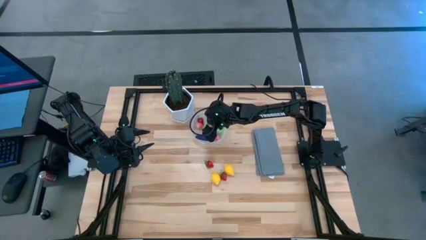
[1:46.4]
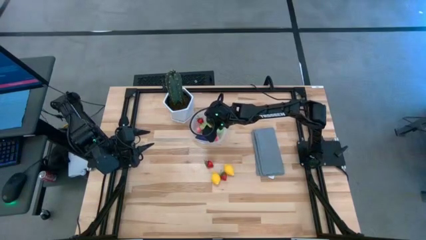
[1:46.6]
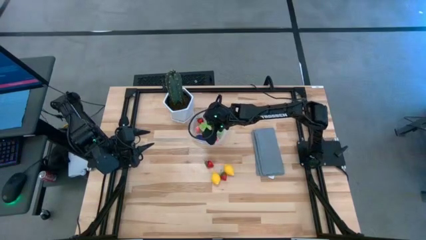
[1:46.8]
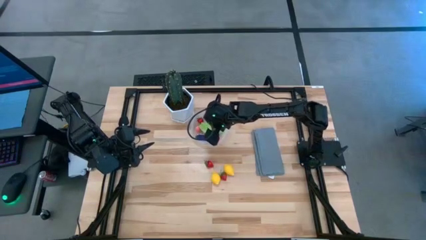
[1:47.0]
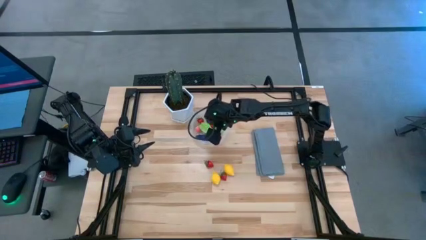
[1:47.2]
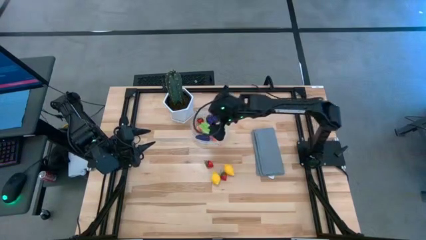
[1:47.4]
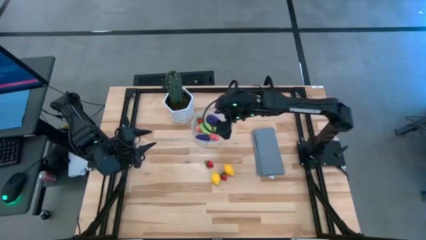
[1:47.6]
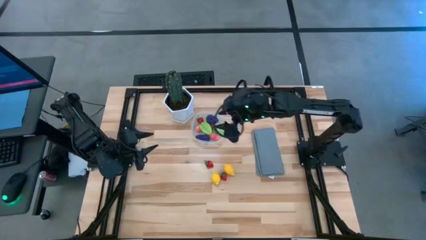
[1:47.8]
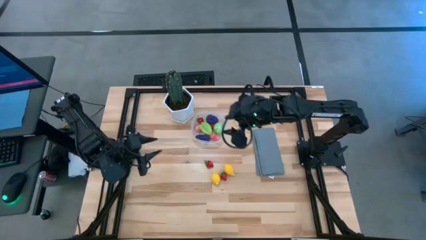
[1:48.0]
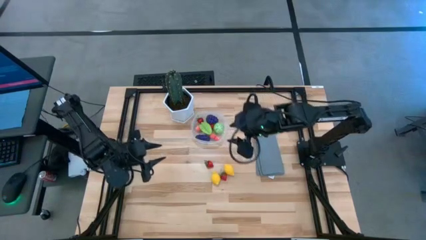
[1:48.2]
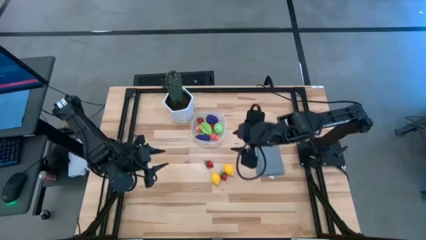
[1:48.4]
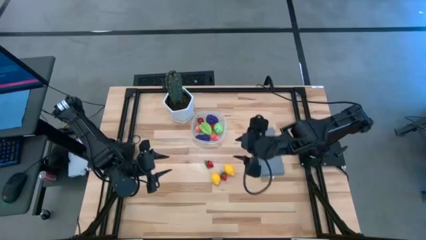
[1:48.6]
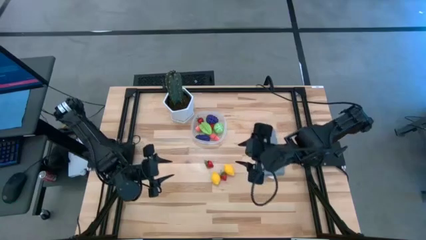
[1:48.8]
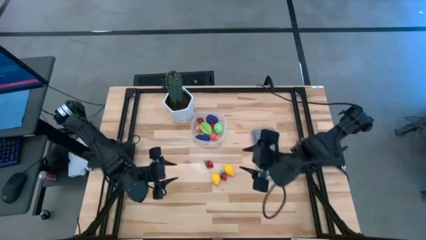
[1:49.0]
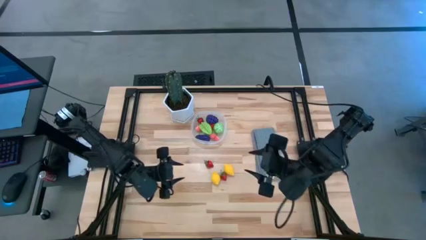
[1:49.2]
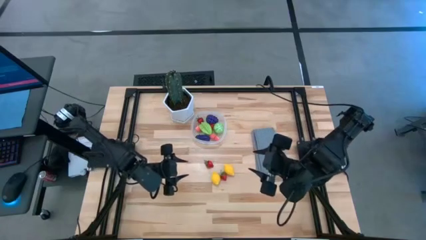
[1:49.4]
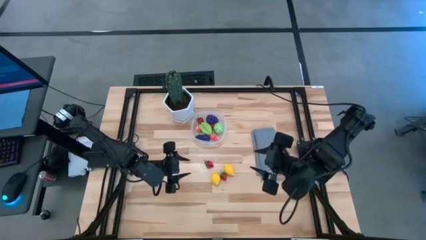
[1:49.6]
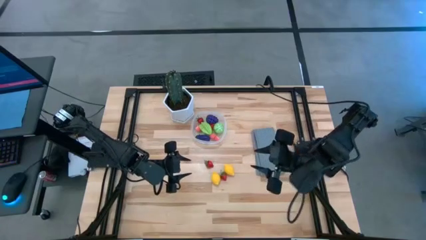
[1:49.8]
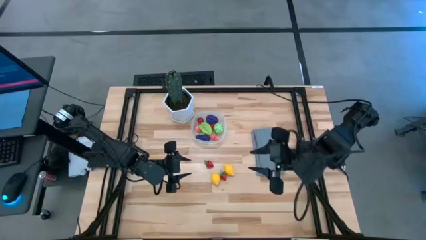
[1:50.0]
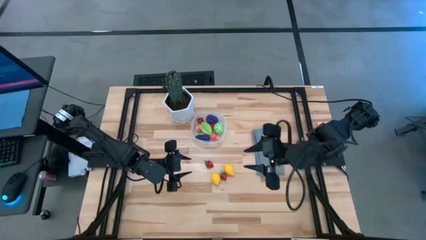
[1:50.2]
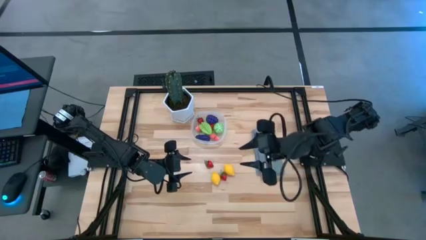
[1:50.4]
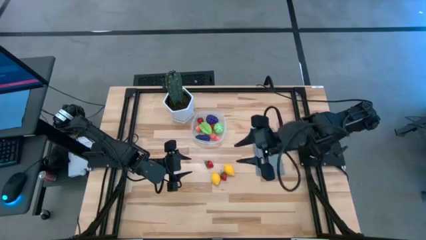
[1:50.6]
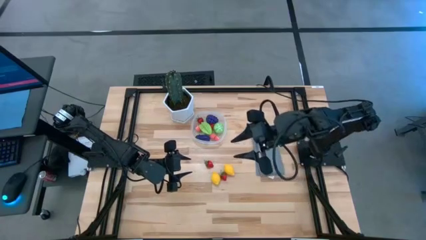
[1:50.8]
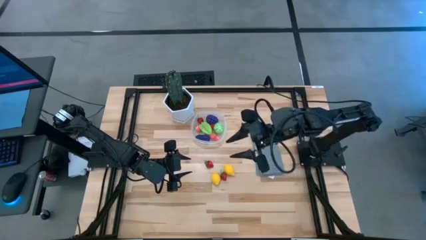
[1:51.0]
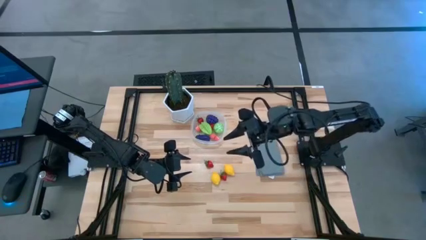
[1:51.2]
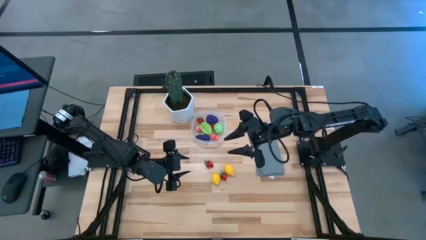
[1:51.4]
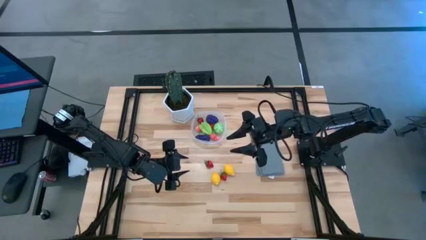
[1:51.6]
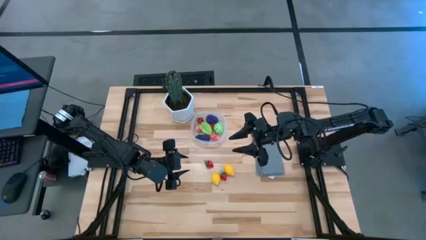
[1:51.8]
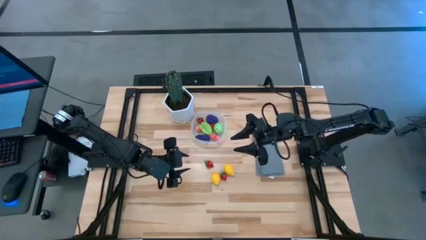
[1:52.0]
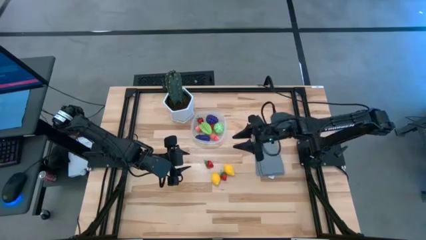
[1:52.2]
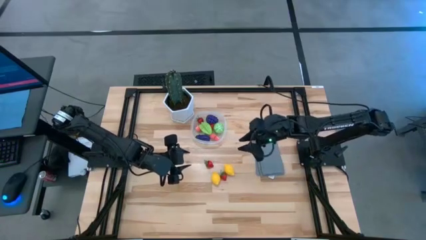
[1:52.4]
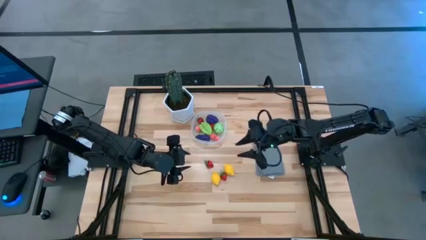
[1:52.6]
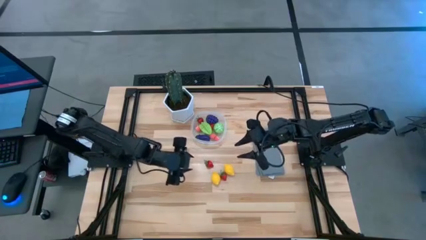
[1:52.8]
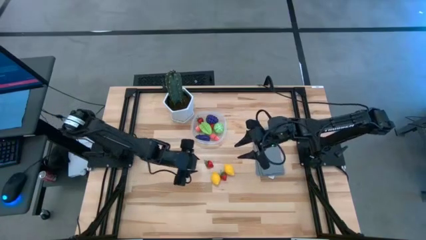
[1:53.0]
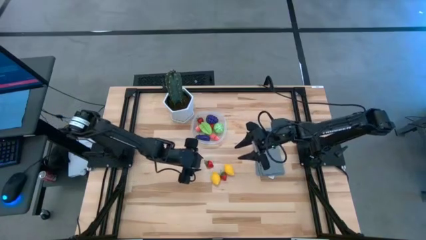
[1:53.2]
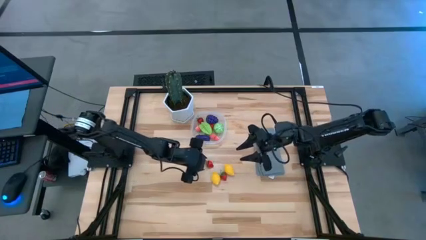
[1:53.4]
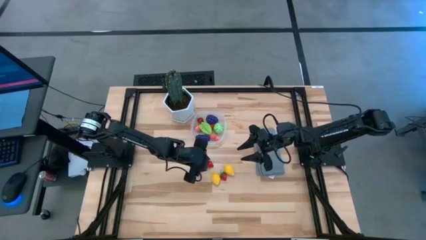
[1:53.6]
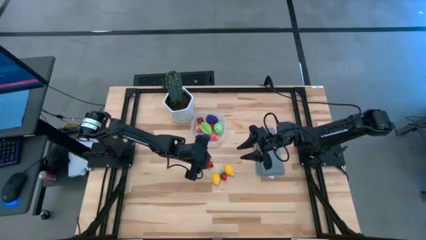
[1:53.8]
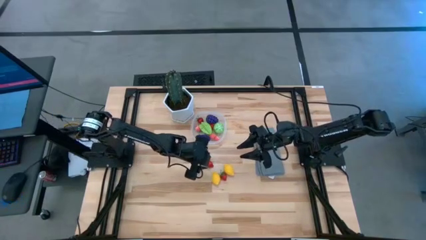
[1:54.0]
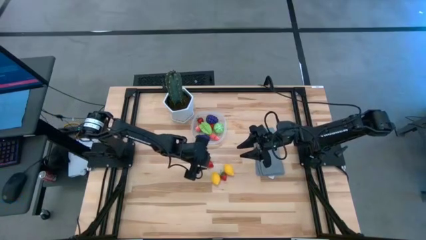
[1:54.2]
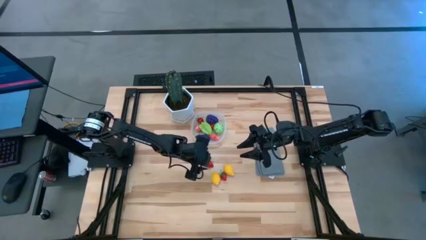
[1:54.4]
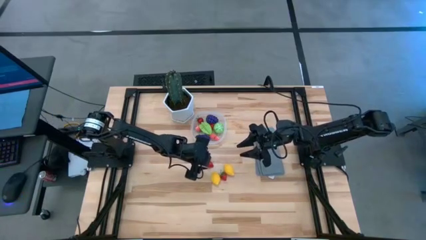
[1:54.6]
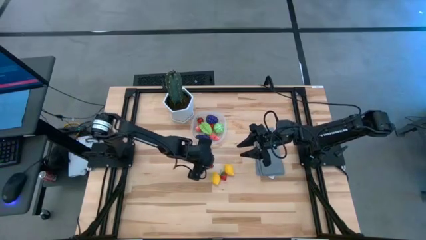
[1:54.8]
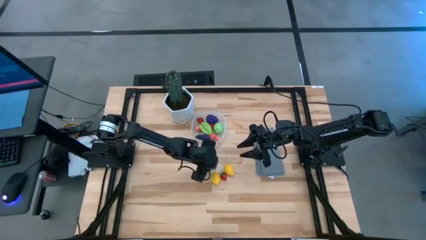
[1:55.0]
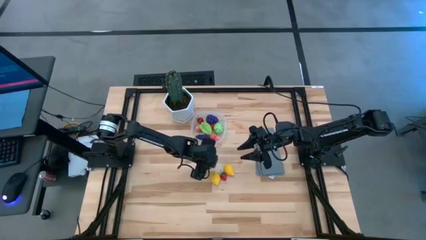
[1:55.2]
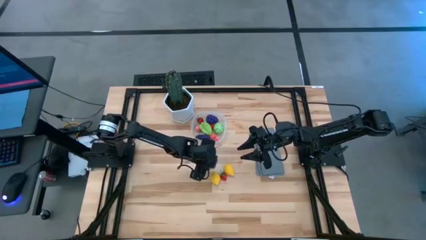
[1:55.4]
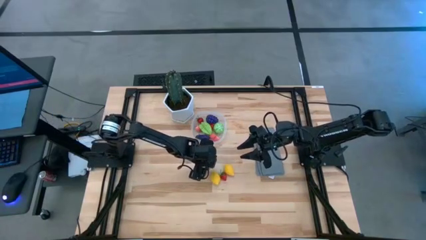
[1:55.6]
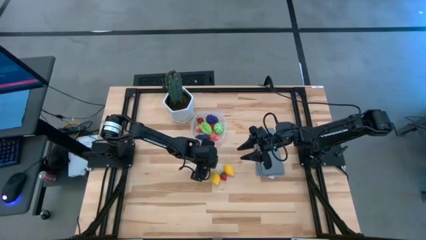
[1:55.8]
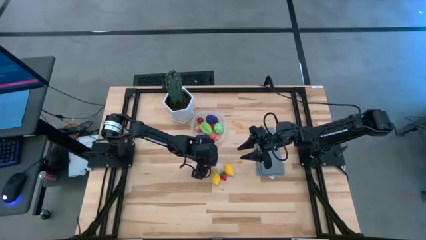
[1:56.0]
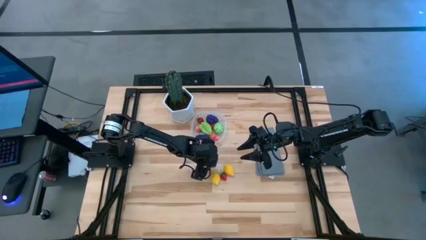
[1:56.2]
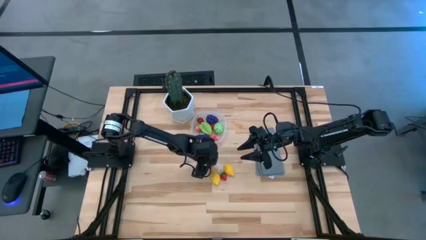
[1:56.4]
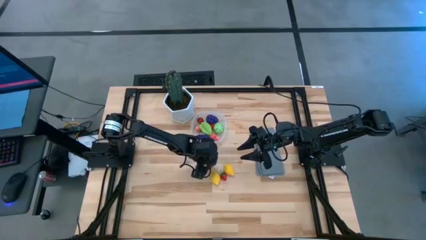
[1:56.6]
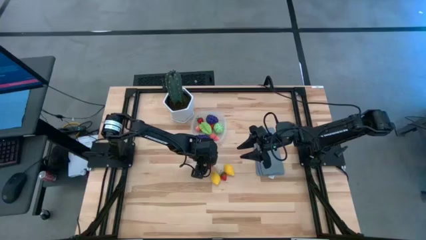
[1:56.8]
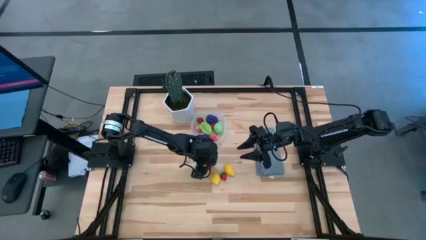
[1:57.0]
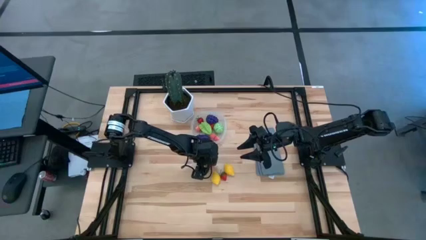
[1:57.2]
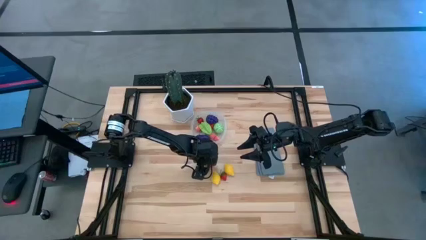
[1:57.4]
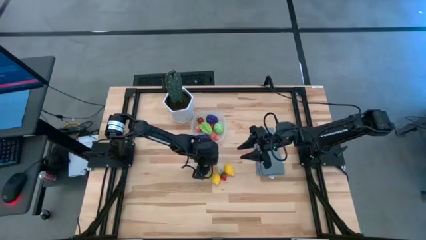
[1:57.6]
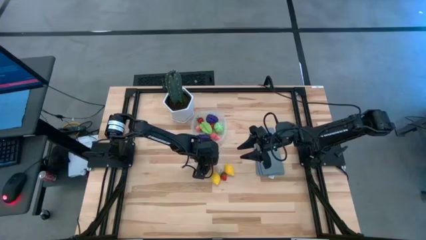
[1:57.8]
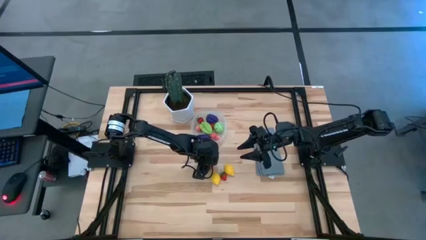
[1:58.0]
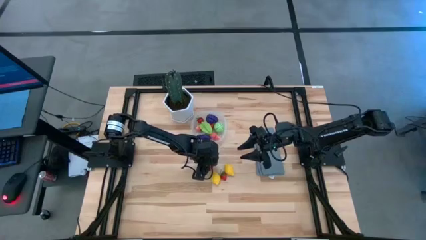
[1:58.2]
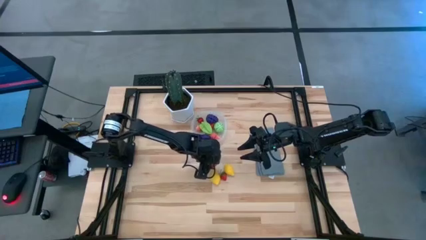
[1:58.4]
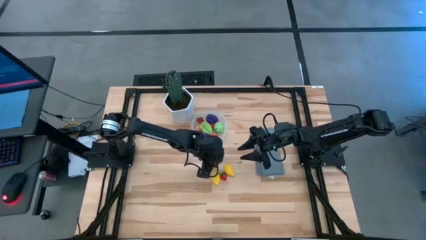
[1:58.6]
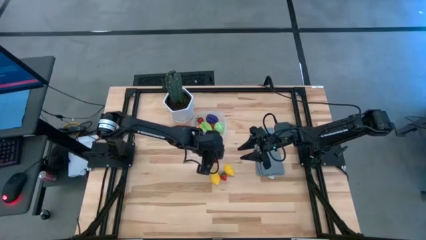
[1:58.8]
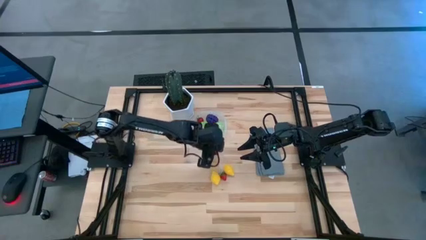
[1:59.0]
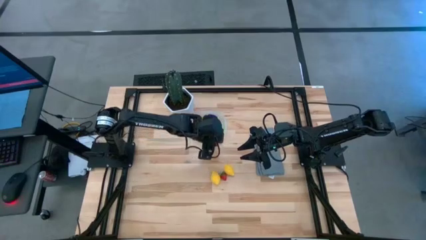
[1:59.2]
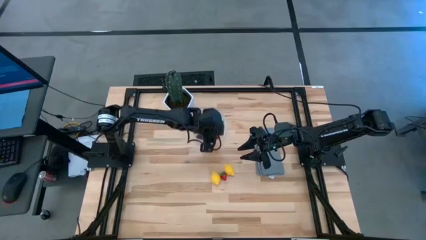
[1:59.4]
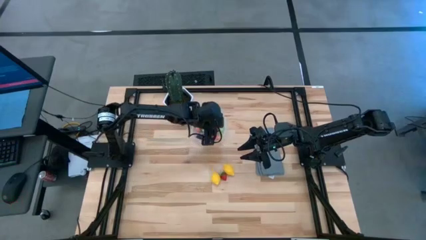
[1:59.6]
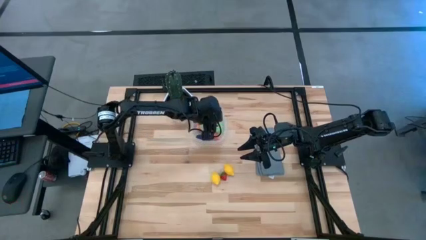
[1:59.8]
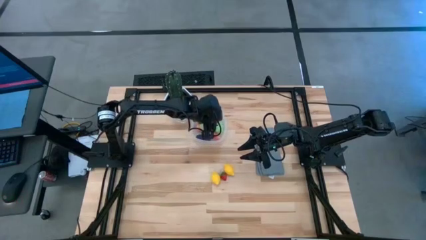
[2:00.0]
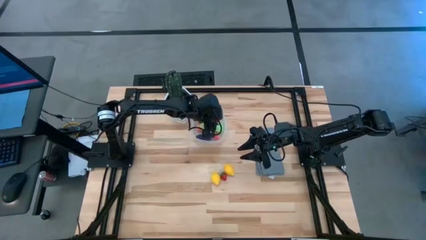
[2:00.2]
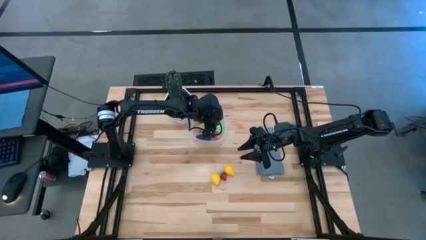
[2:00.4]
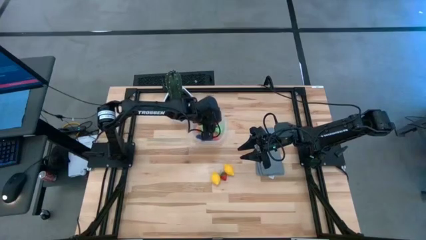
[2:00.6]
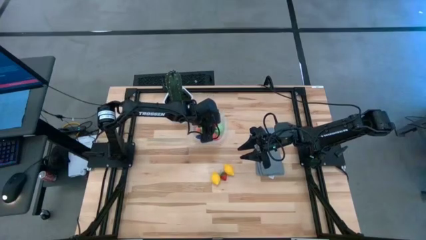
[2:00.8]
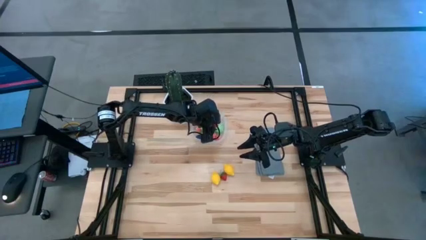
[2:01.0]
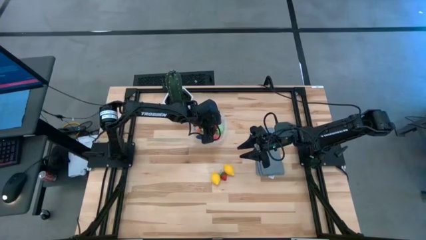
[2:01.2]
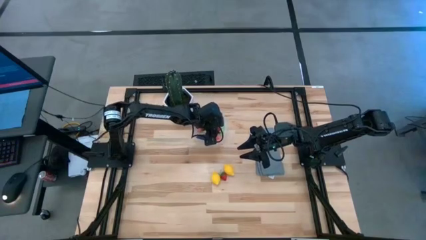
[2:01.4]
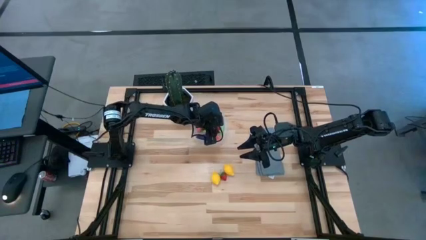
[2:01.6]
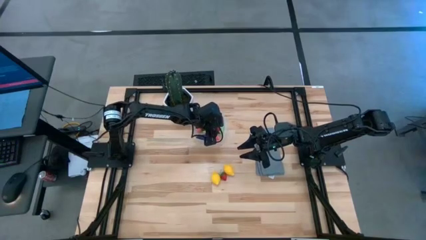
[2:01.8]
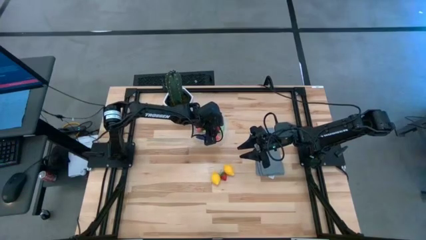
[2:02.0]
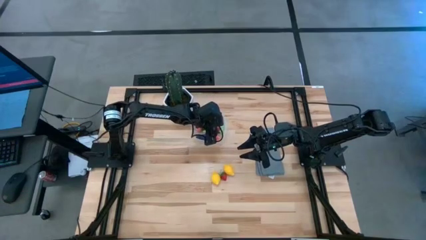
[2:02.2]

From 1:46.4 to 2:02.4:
Task: Pick and placing Produce into tupperware
Put the left strawberry into the transparent bin

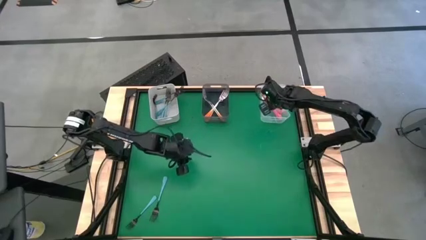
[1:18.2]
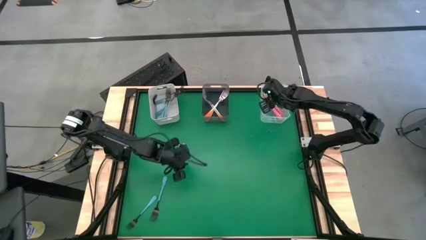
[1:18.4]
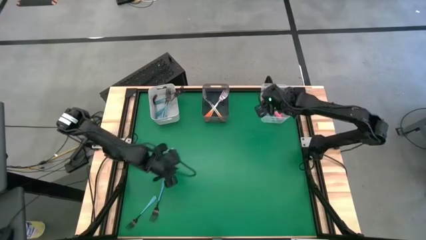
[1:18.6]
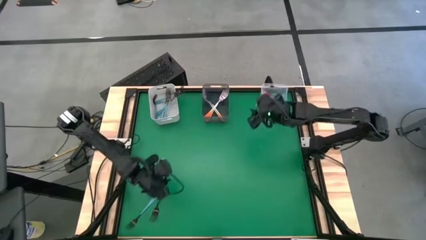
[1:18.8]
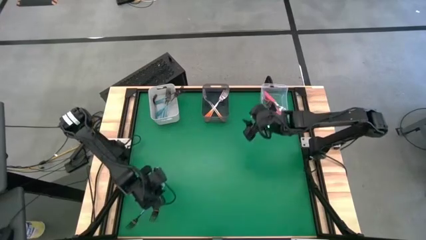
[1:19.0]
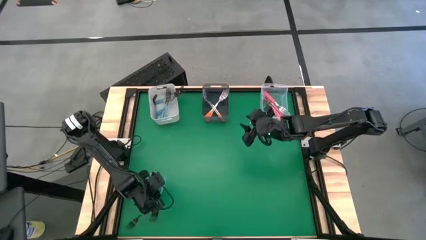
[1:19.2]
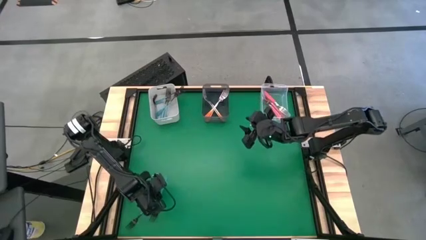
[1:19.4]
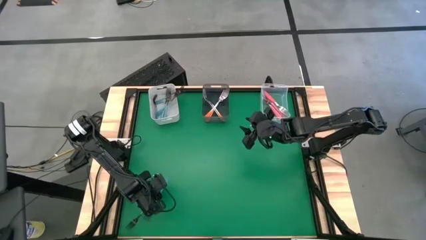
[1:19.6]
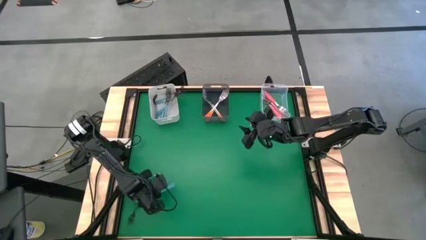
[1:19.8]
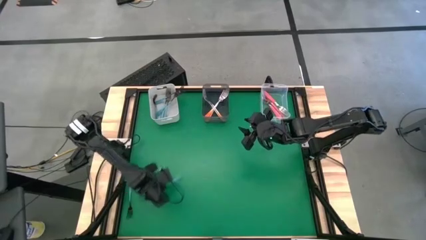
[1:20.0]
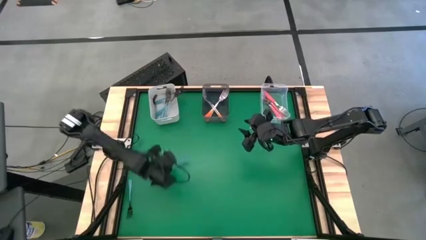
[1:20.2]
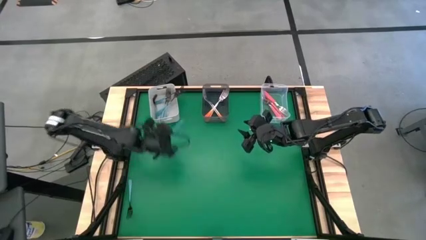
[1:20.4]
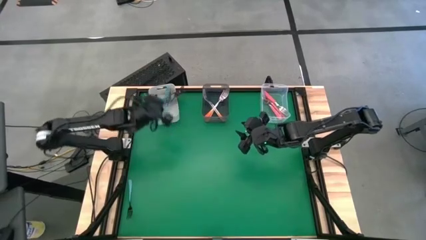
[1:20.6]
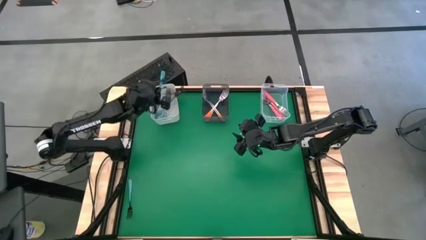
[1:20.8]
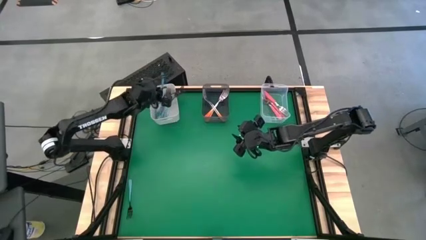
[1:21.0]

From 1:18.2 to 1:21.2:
Task: Sort silverware by color (type)
Put the blue fork into the white bin
